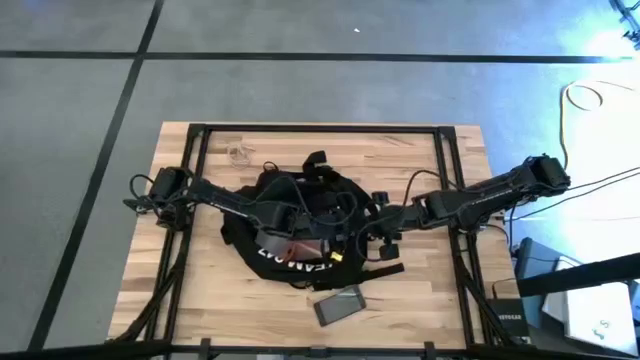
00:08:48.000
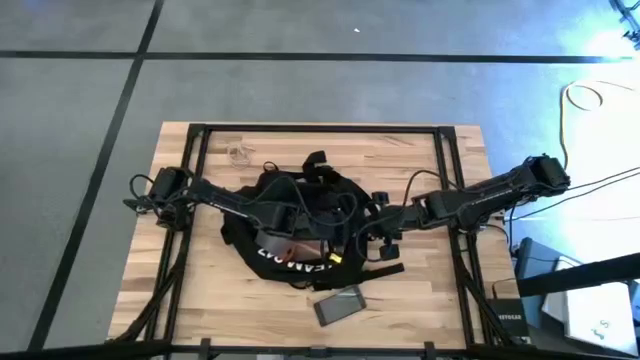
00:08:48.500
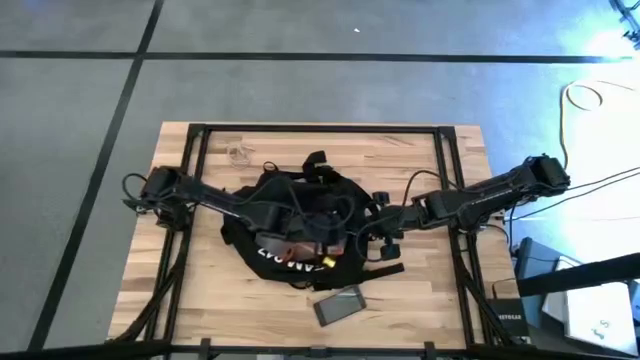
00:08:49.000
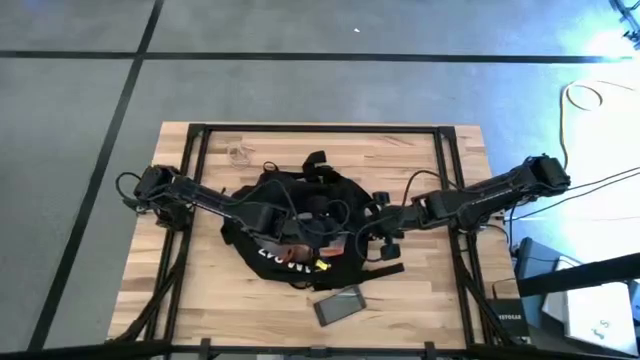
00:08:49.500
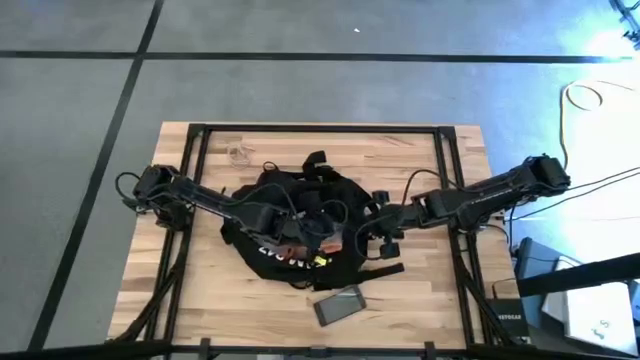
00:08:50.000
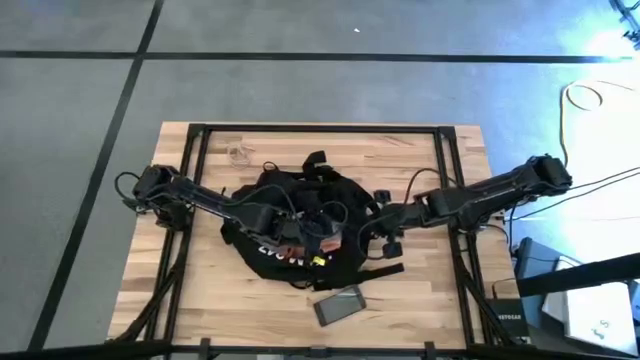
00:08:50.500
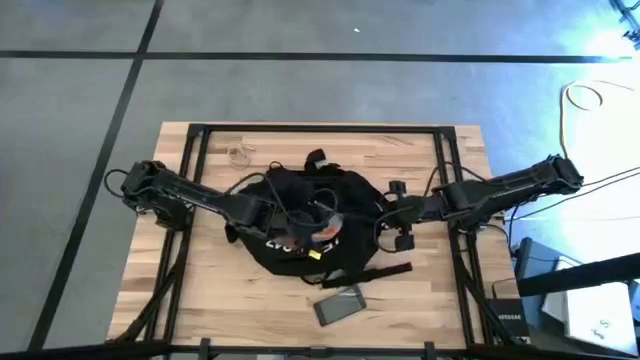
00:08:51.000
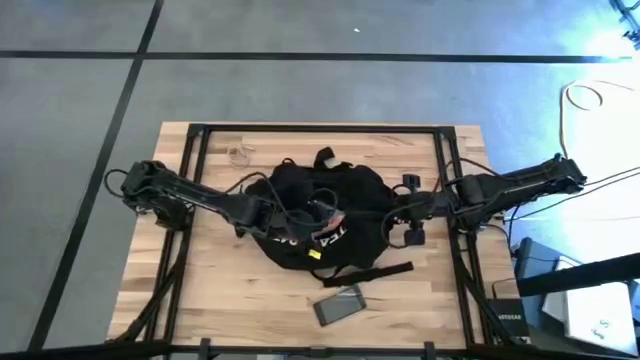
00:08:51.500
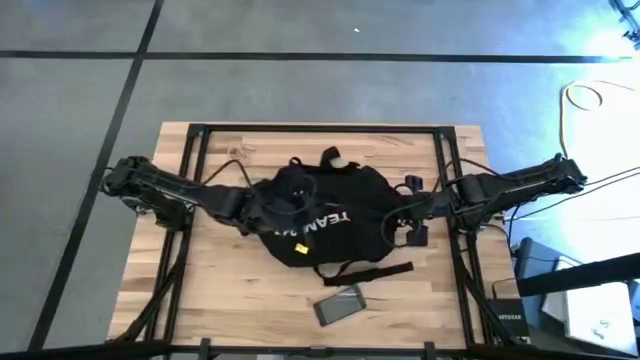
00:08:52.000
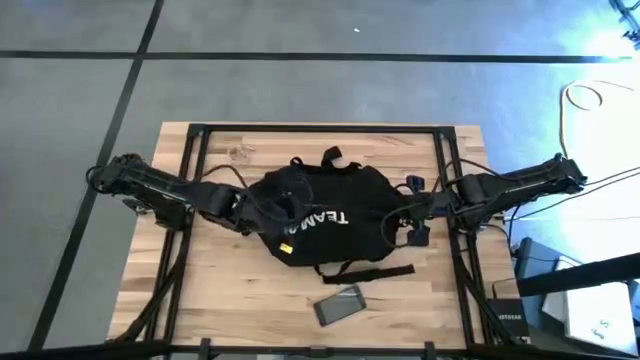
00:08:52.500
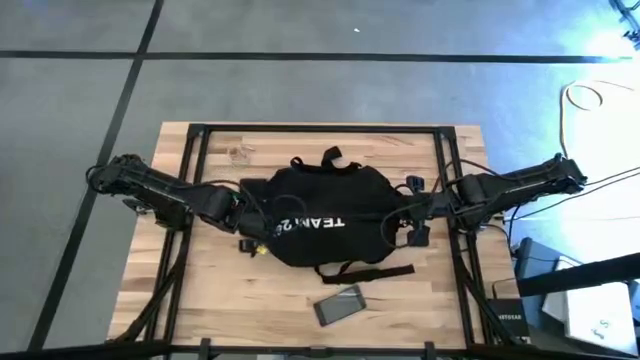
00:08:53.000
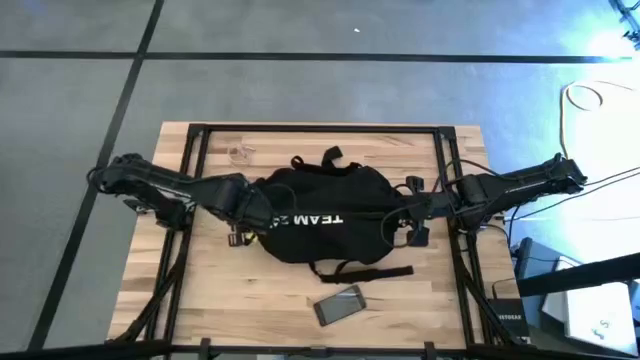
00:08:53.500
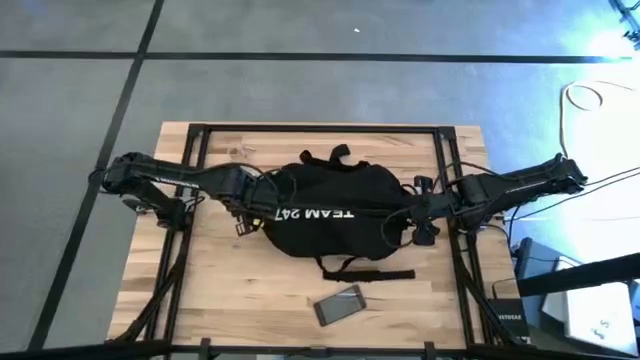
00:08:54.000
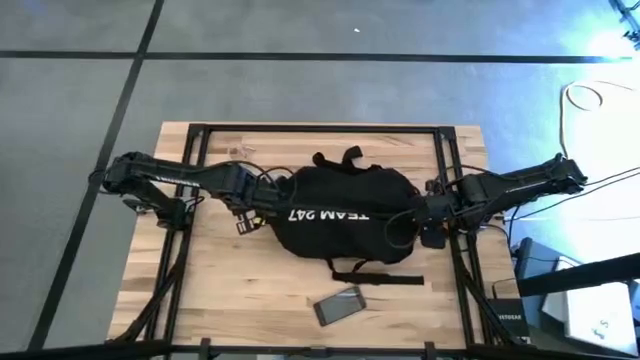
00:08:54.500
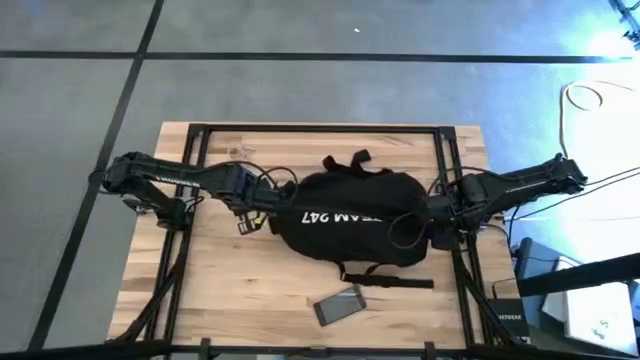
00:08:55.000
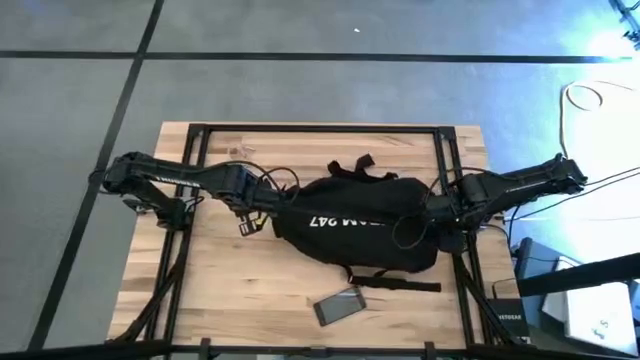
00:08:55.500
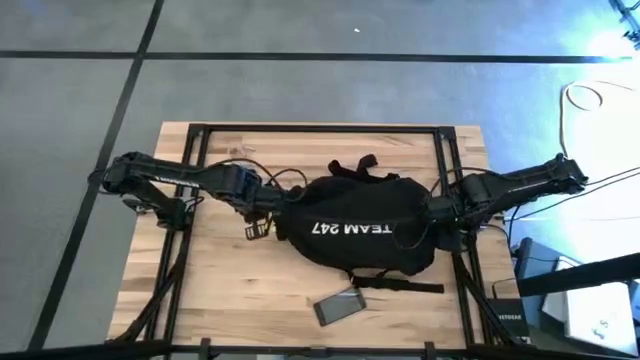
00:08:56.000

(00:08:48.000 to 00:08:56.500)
Task: Unpack backpack
Close the black backpack

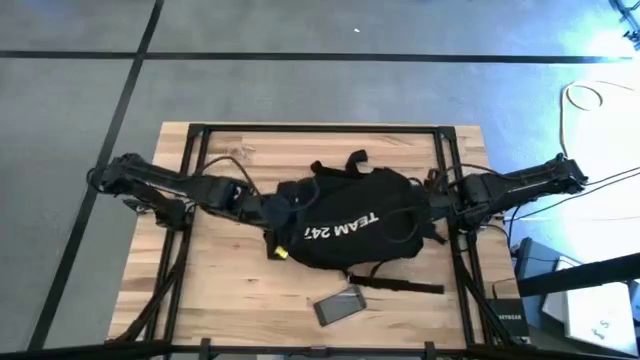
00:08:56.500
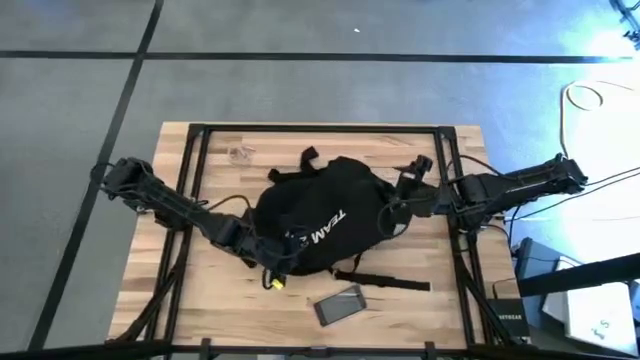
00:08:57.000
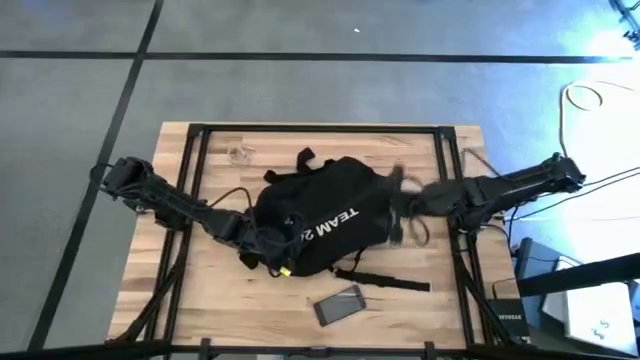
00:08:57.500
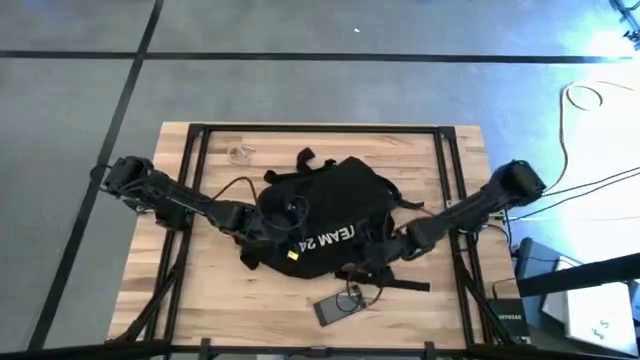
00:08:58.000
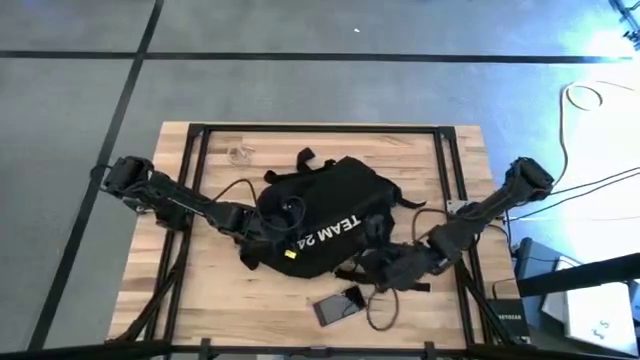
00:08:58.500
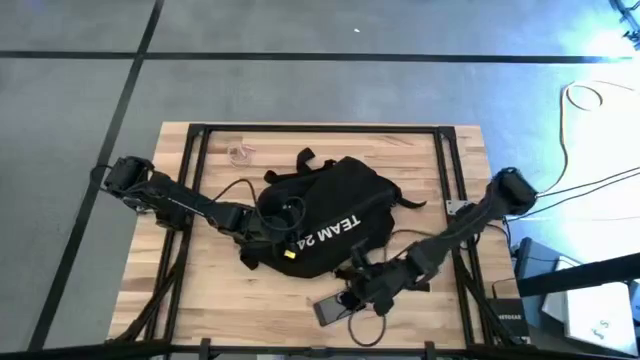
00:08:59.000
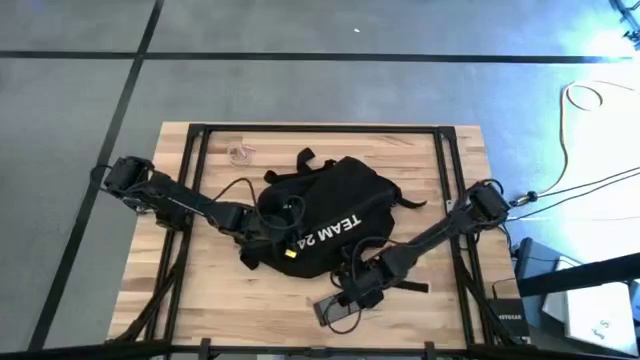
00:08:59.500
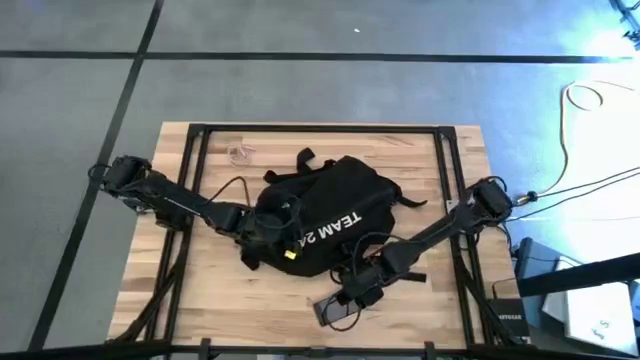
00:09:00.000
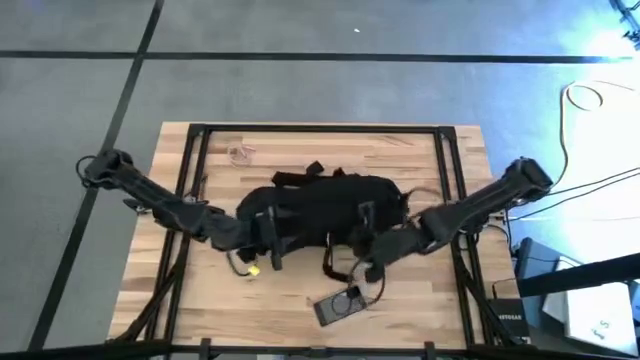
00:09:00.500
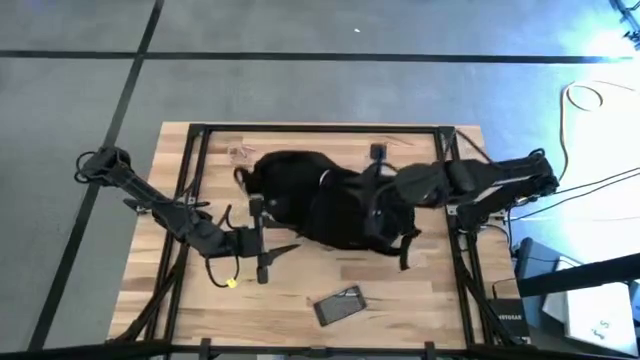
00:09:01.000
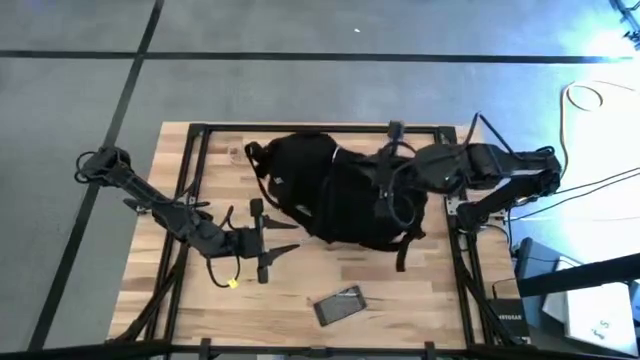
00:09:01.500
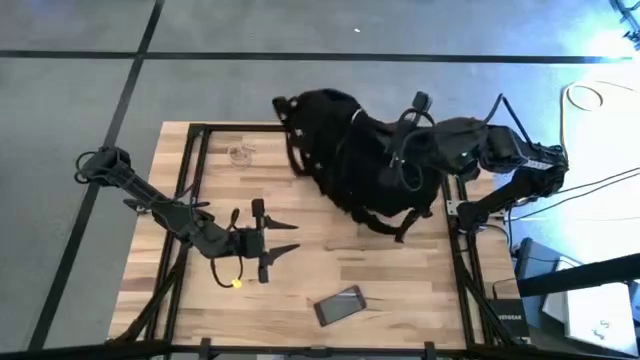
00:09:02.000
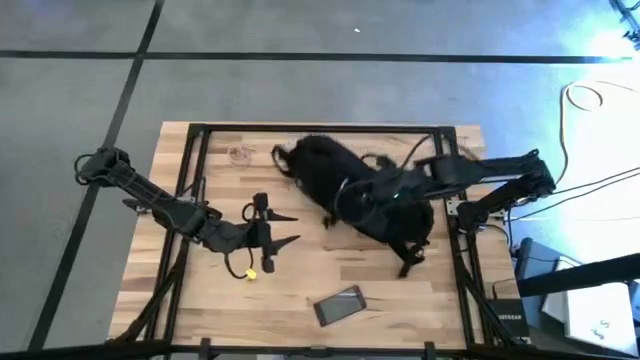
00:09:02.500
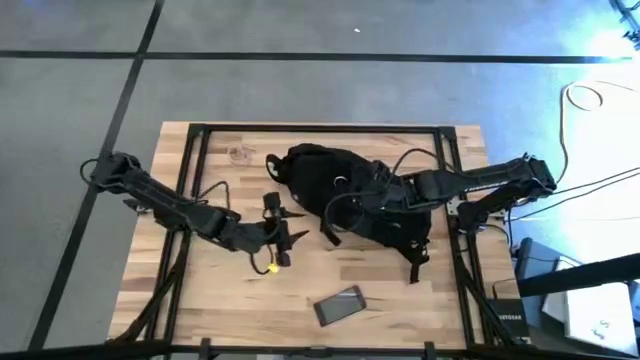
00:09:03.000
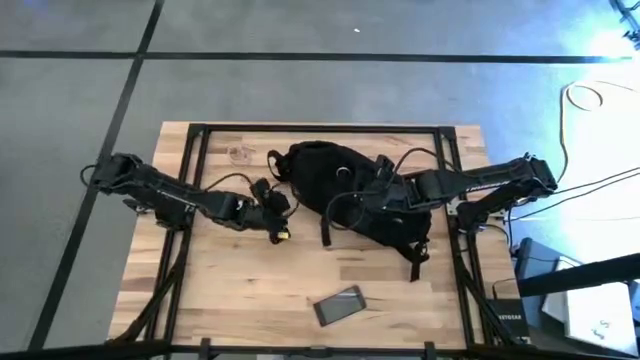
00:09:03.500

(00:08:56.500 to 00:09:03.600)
Adjust the black backpack

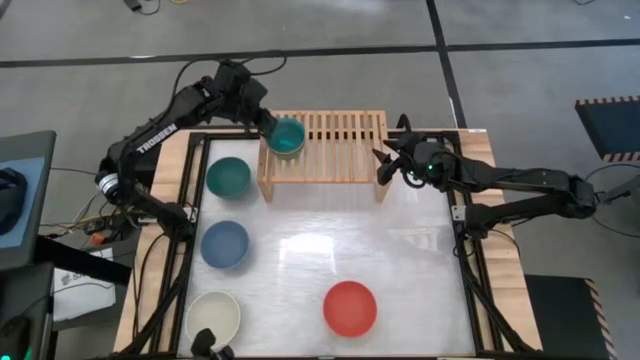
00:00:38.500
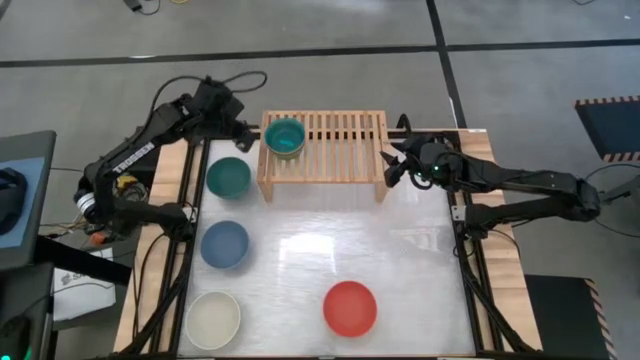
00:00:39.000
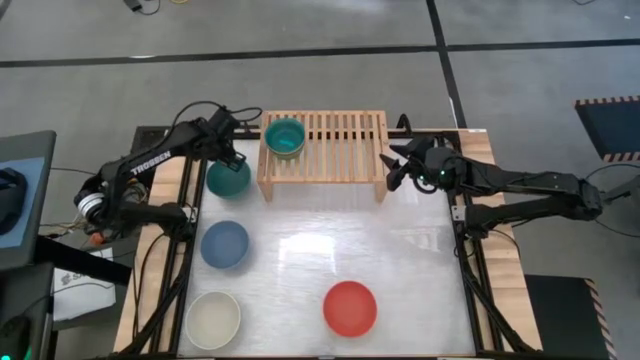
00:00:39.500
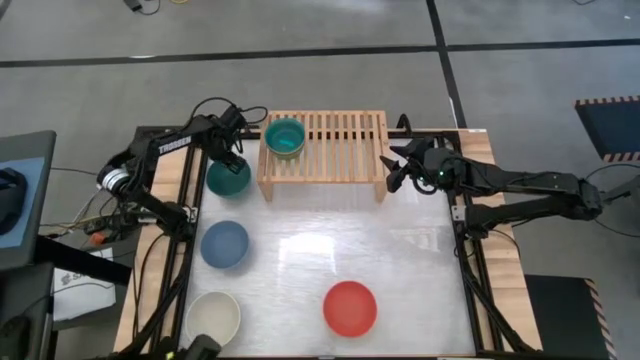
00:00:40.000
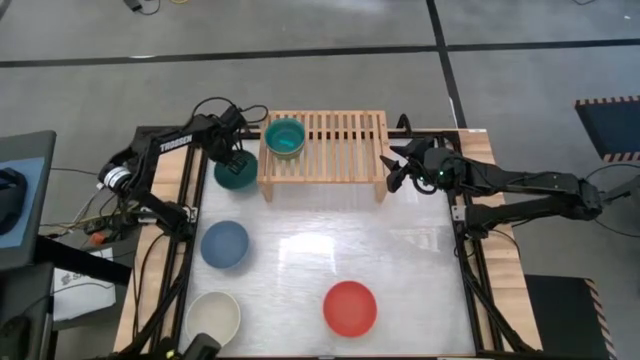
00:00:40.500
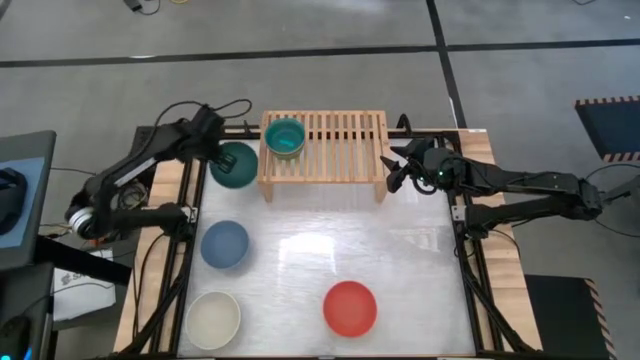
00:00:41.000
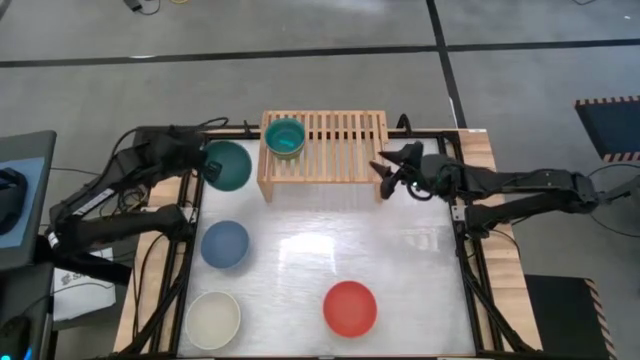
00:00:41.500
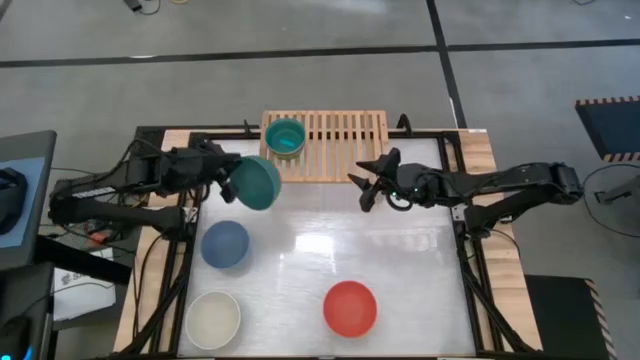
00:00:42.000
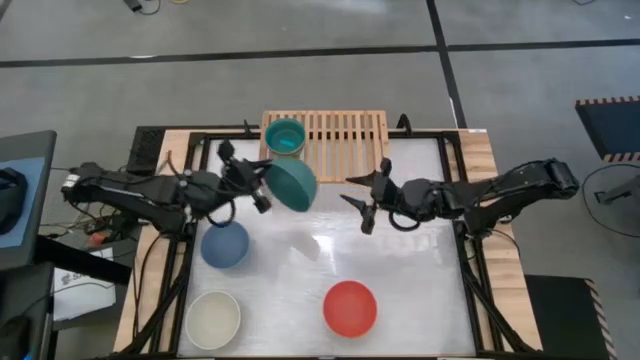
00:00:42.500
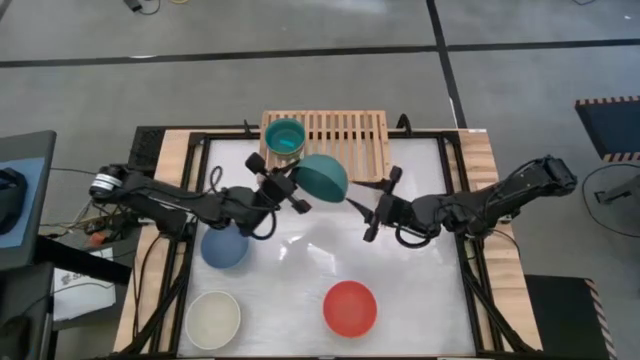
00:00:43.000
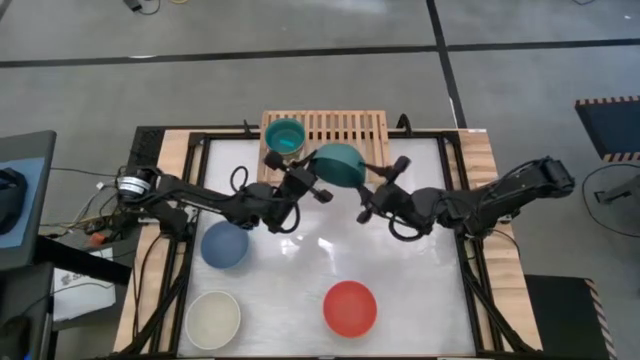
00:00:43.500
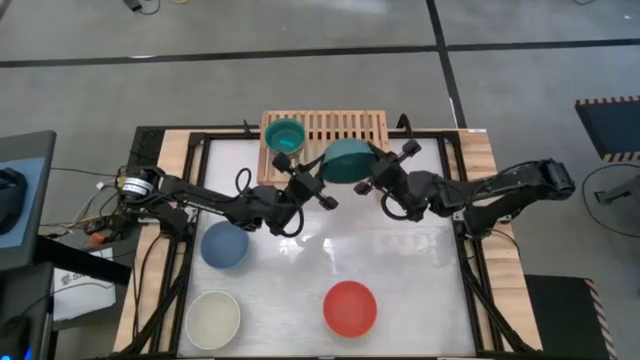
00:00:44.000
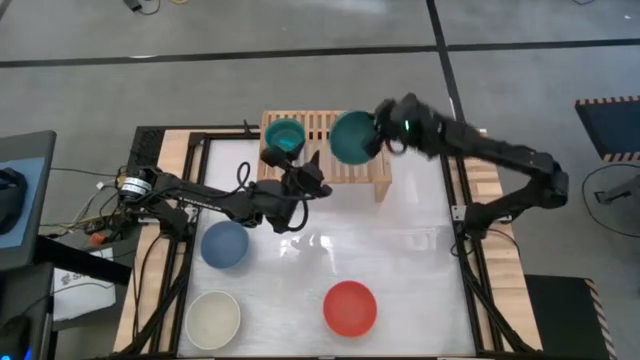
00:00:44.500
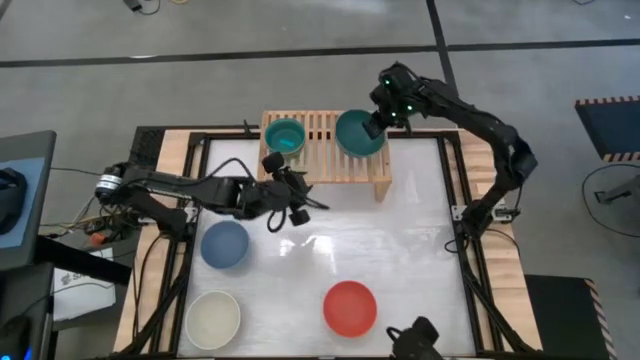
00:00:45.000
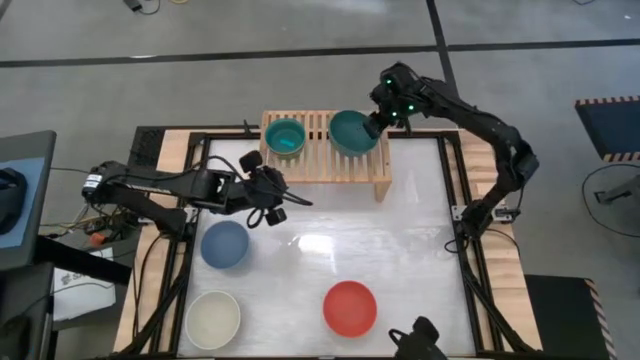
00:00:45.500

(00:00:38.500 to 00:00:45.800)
Task: Place and stack bowls onto a shelf
Put the green bowl on the shelf
